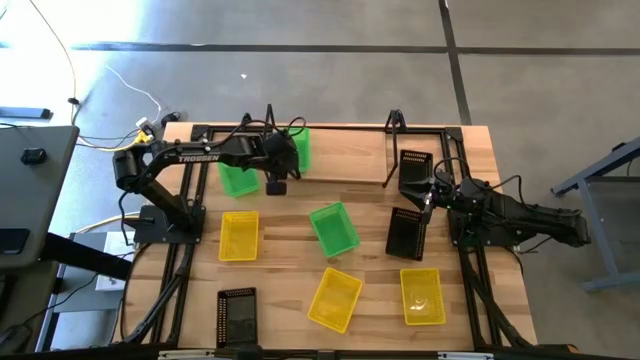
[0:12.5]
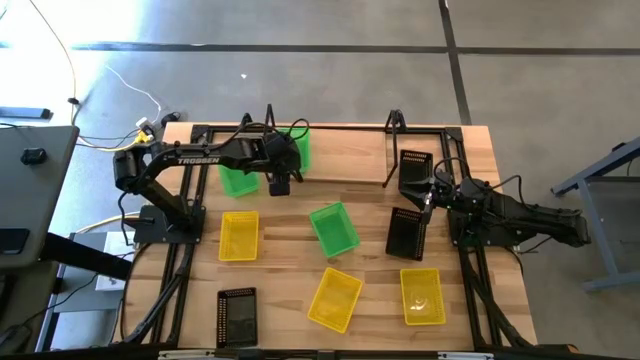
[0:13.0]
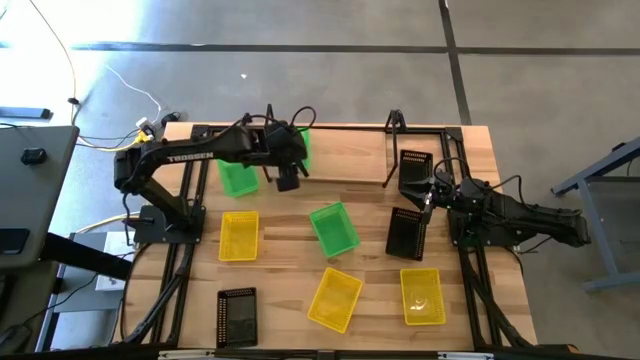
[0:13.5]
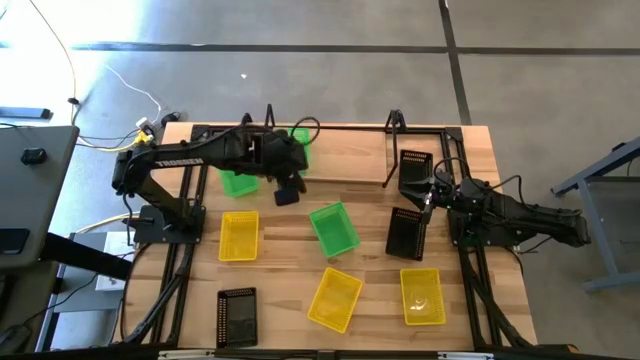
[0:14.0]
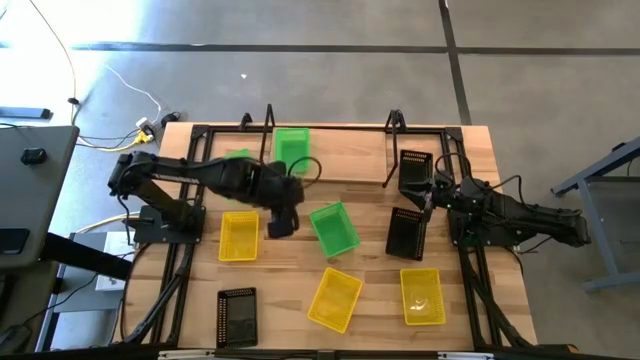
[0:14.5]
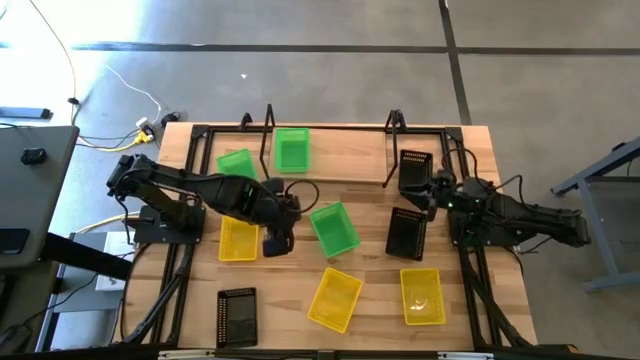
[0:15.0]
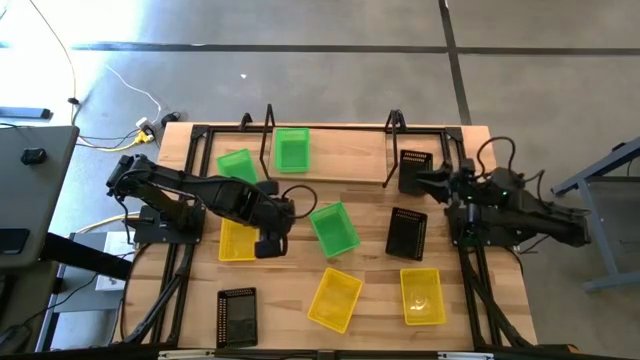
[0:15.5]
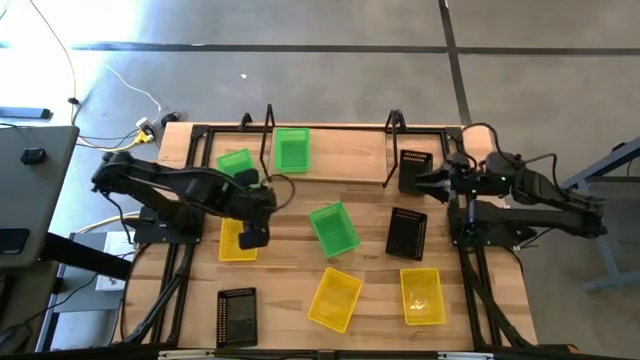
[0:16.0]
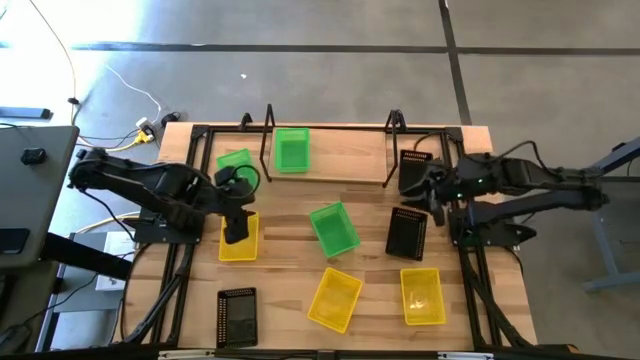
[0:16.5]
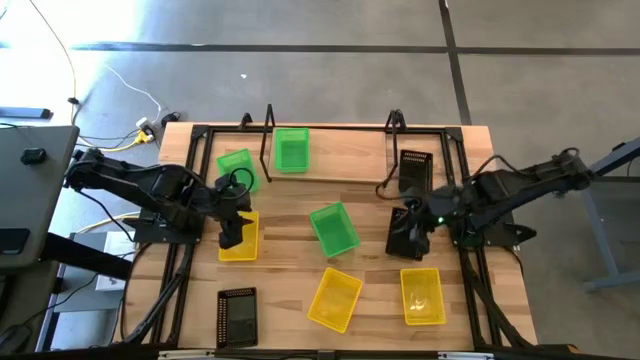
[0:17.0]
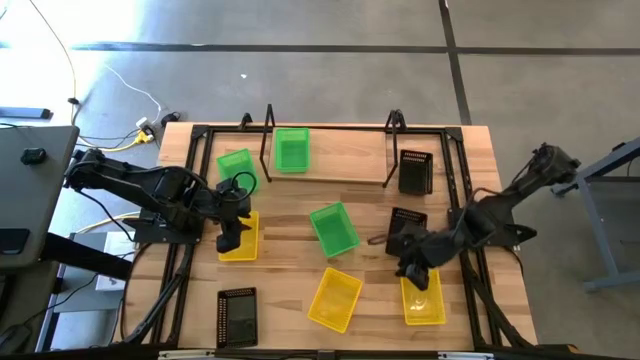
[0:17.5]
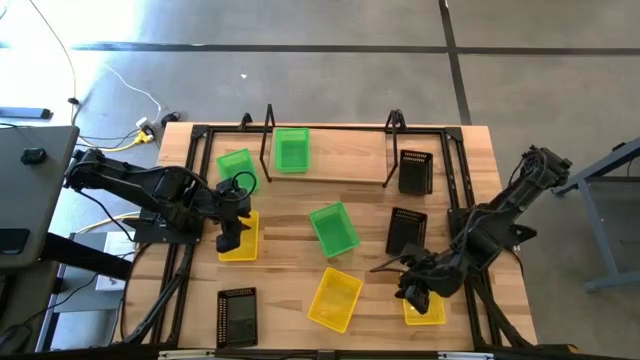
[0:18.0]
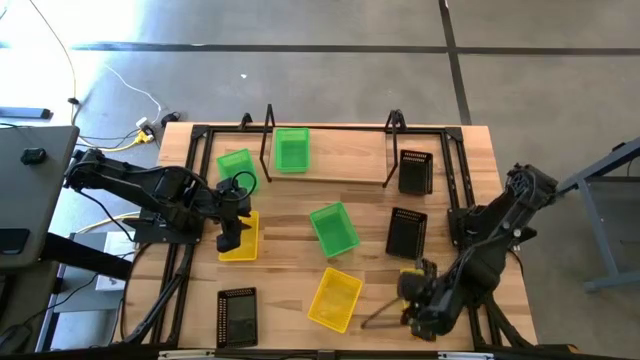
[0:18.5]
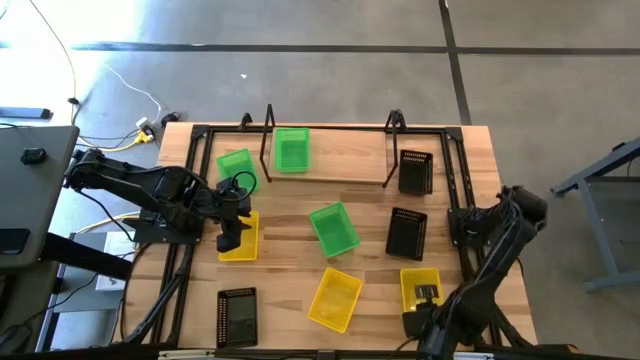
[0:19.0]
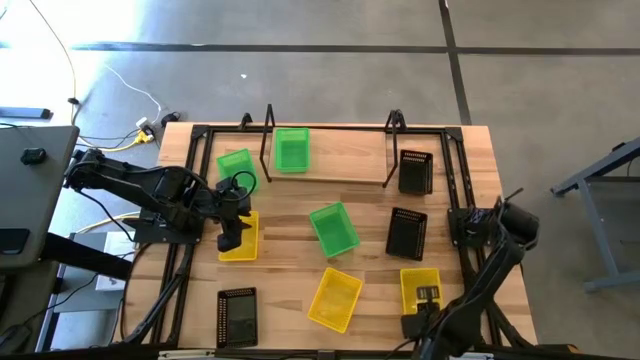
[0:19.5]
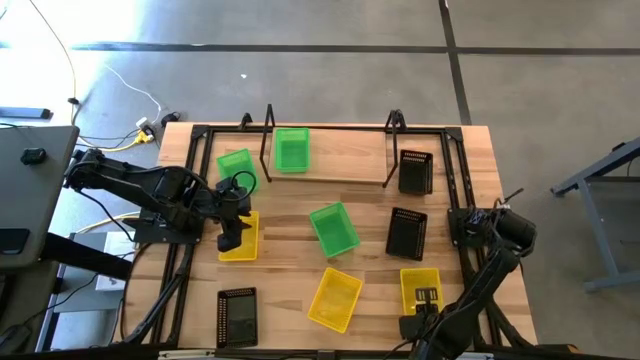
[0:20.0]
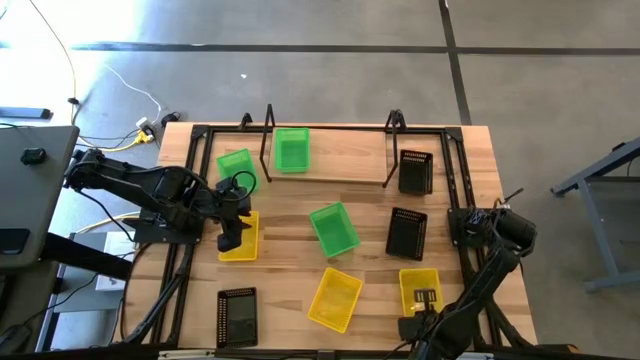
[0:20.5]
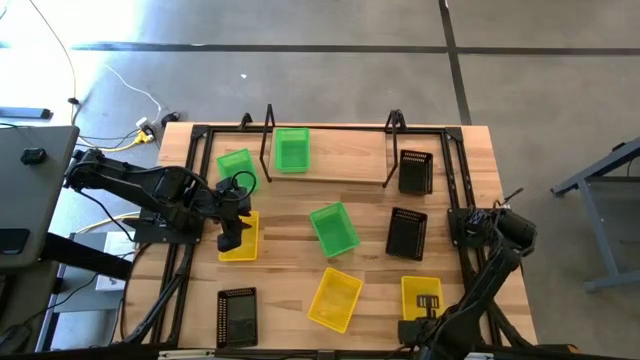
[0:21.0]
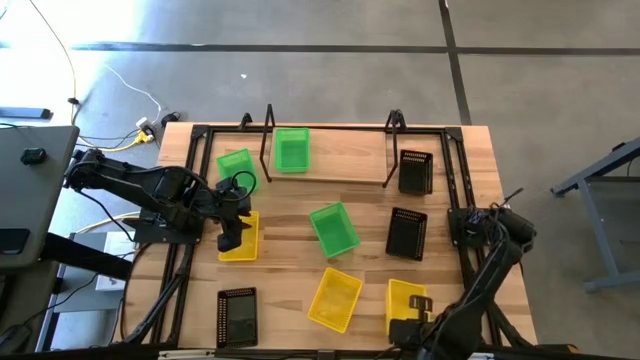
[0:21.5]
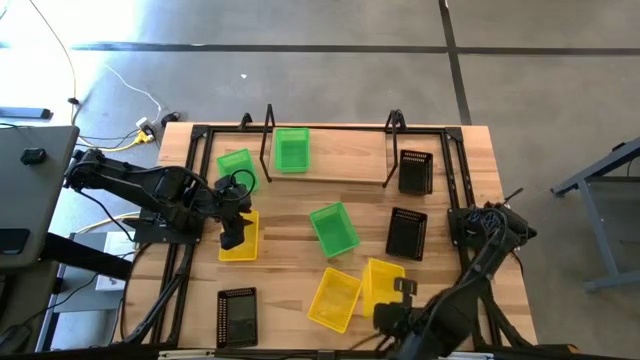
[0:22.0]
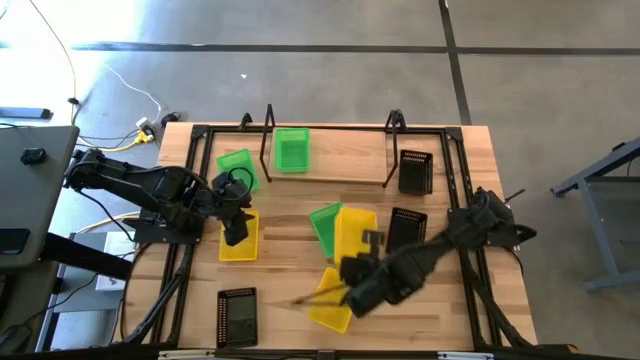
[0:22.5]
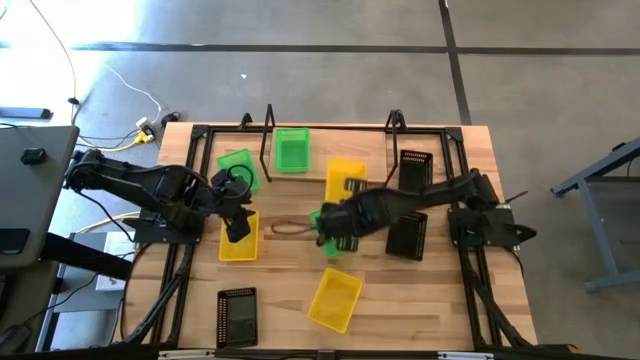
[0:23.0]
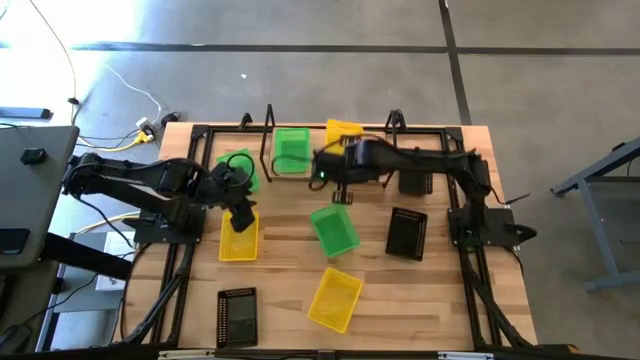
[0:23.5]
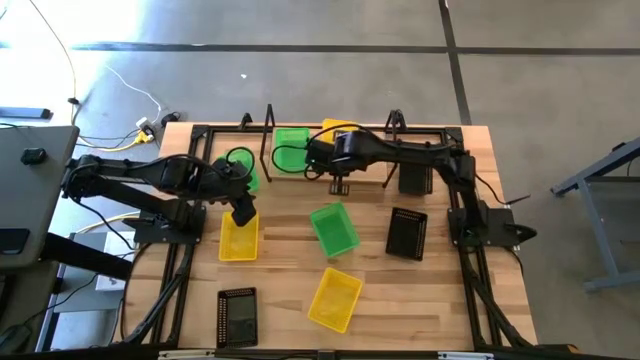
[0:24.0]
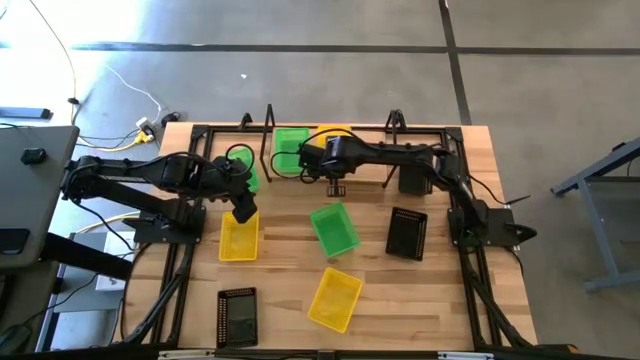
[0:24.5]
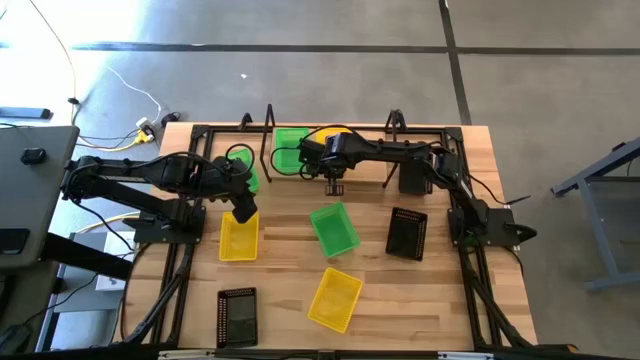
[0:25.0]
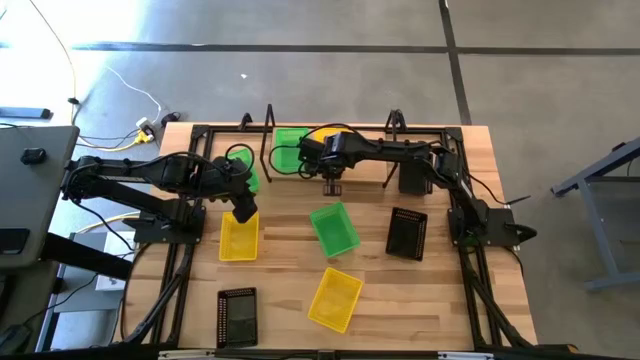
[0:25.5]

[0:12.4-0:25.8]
Task: Stack baskets on shelf by color
Put the bottom right yellow bin on the shelf

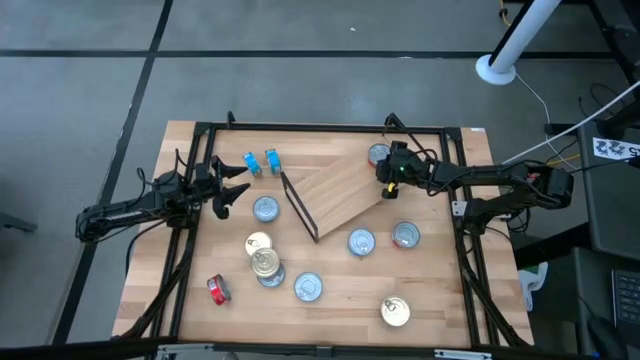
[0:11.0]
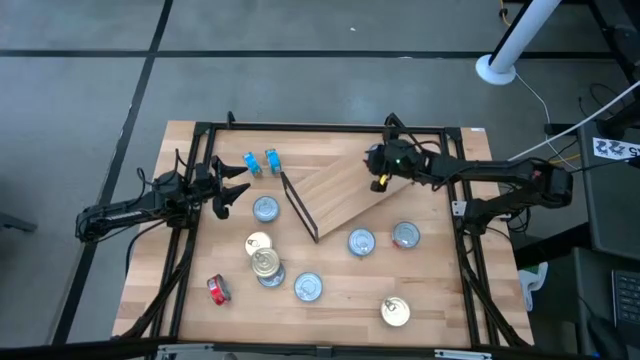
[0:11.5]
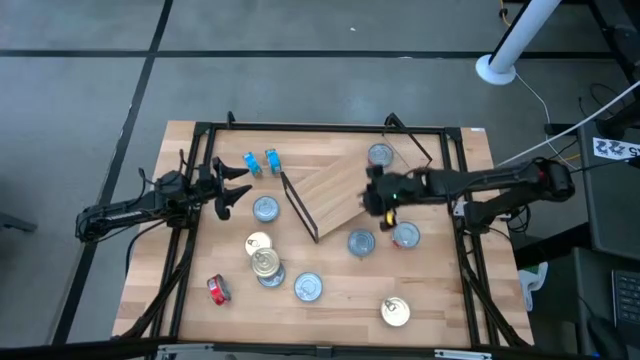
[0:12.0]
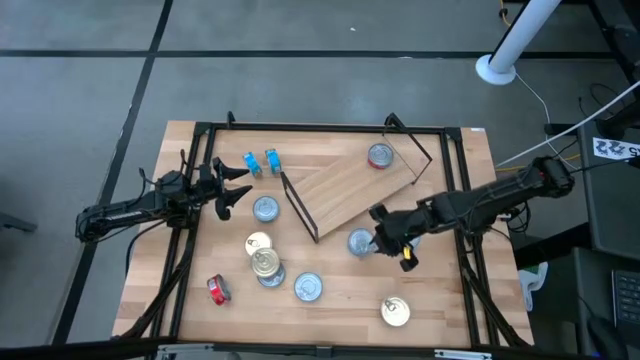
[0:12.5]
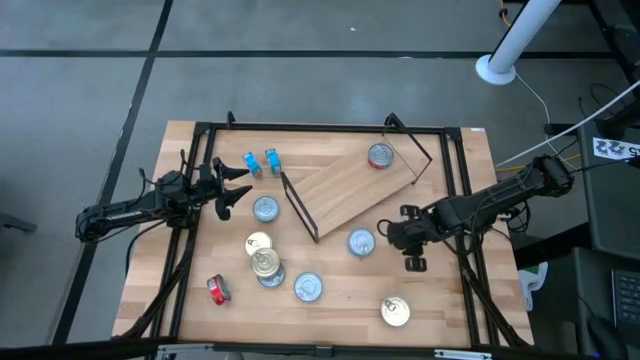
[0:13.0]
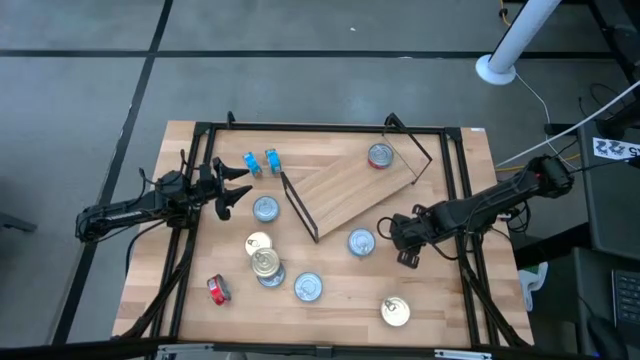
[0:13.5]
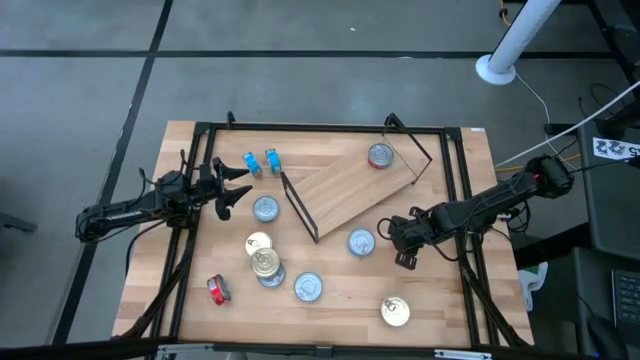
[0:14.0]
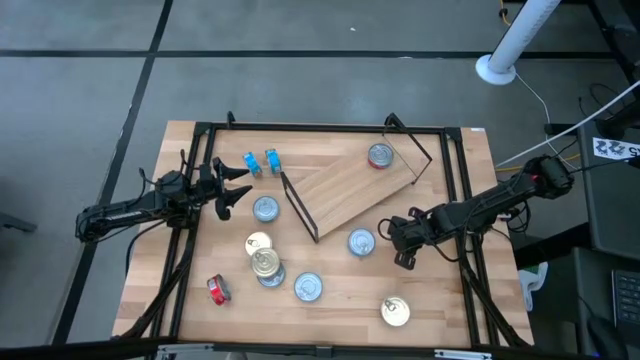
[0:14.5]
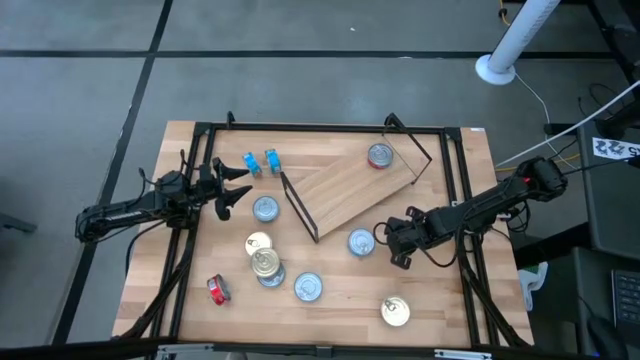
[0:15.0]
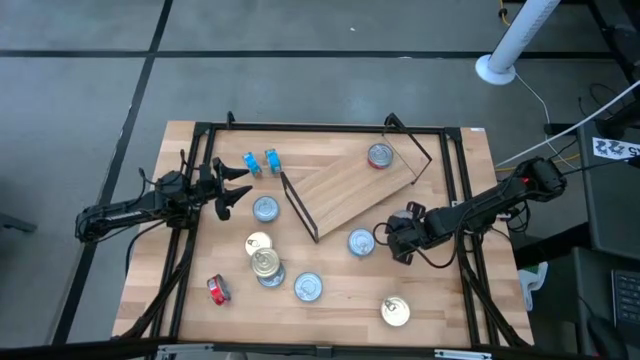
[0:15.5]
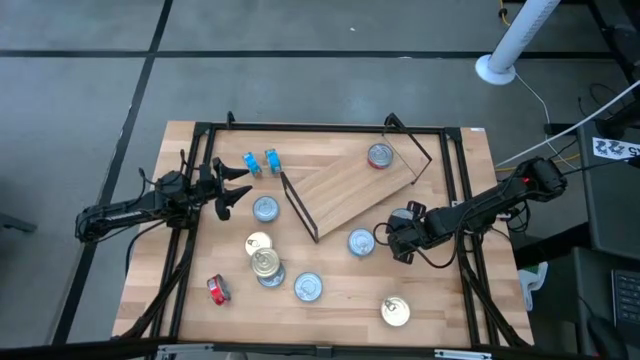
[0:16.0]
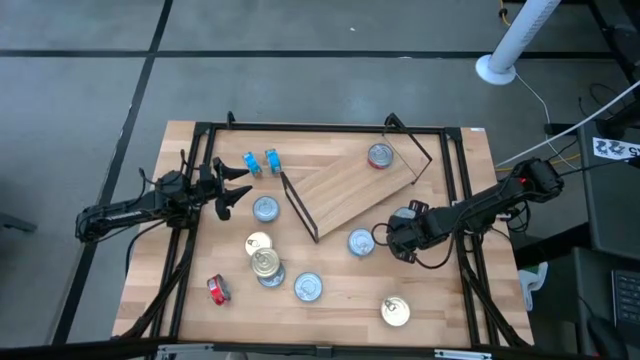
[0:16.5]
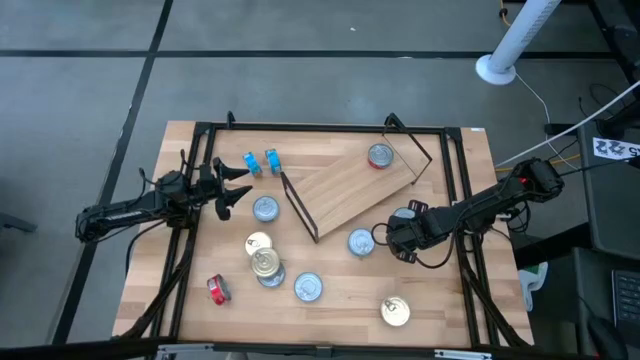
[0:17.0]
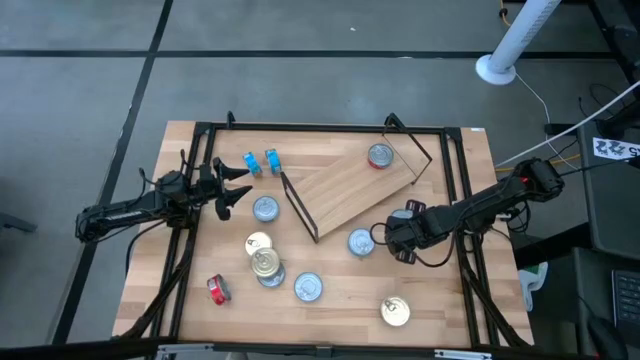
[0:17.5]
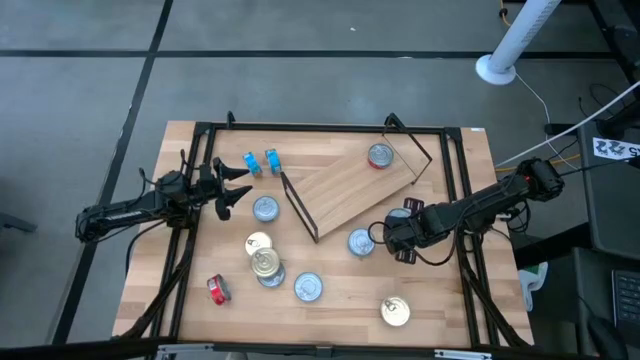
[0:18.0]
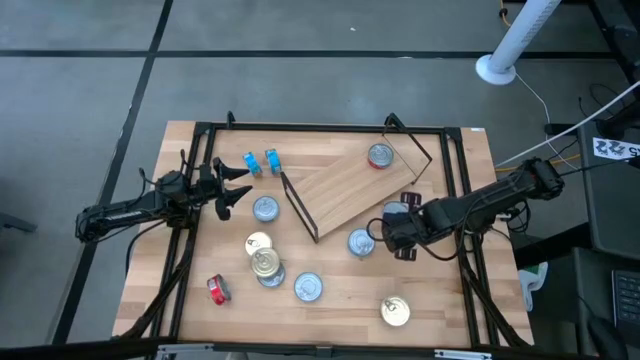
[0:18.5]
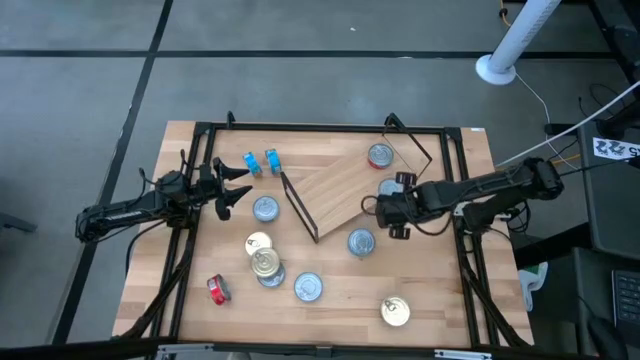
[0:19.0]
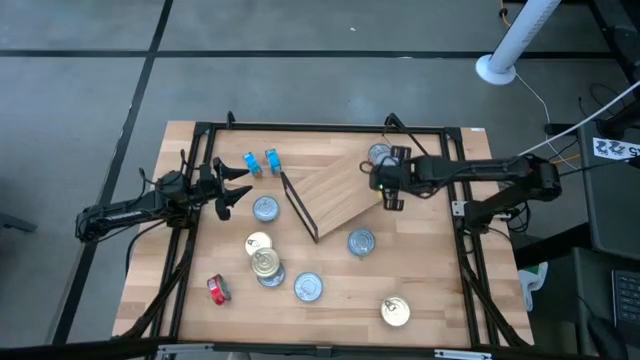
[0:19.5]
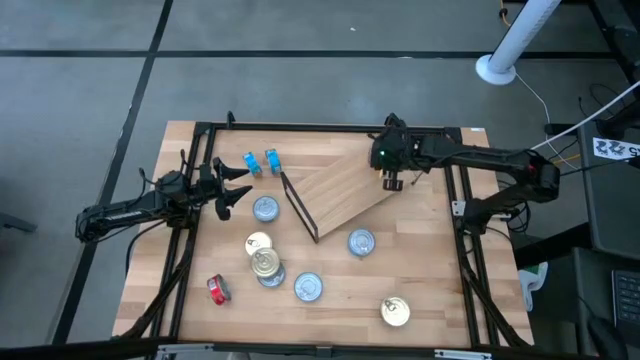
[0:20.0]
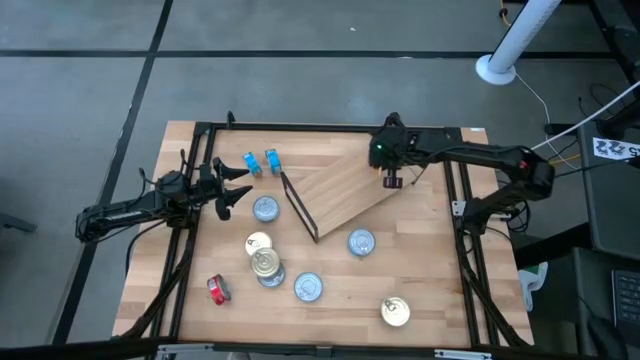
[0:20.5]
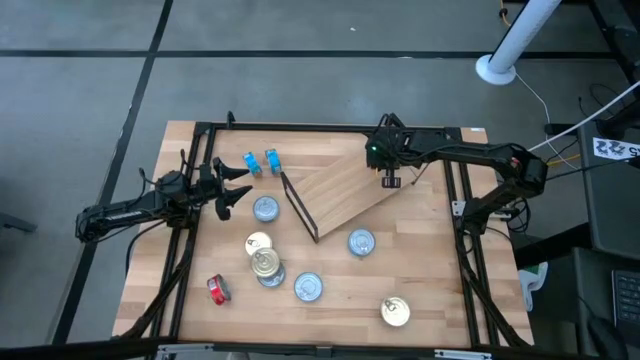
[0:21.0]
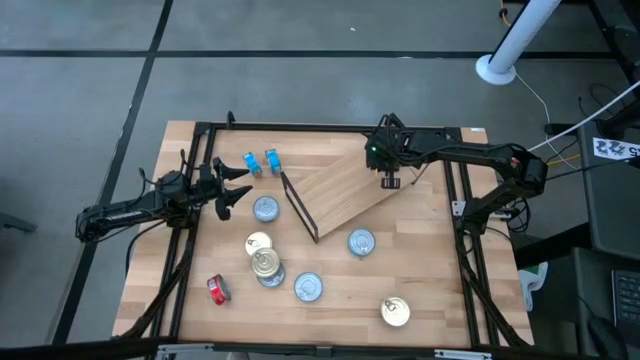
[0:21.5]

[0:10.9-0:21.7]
Task: Stack canned seafood by type on shelf
Stack the right red tuna can on top of the red tuna can on the shelf
